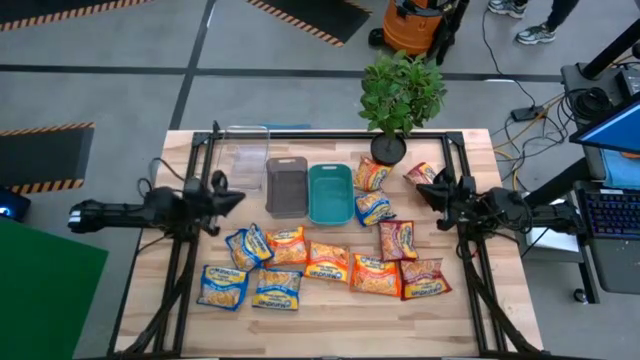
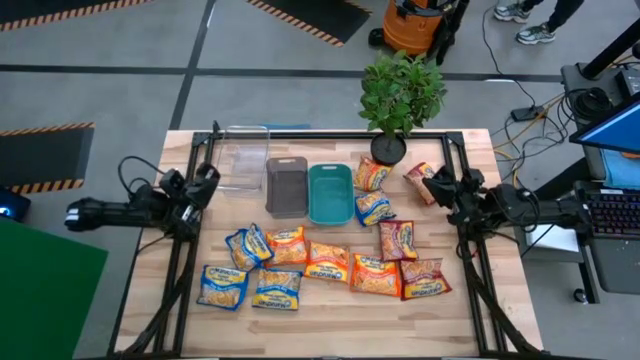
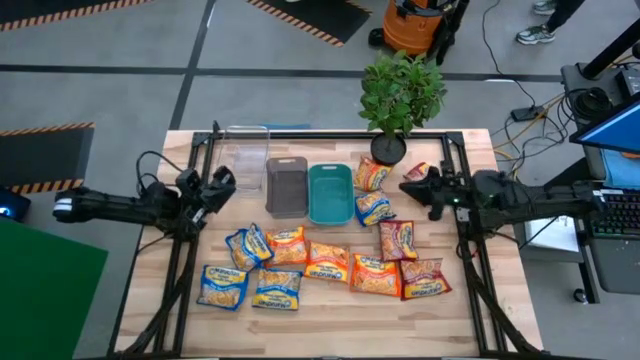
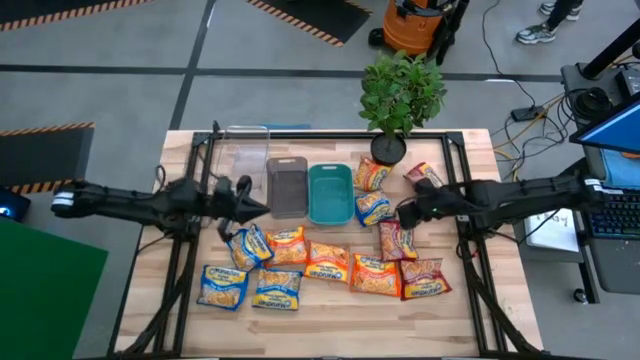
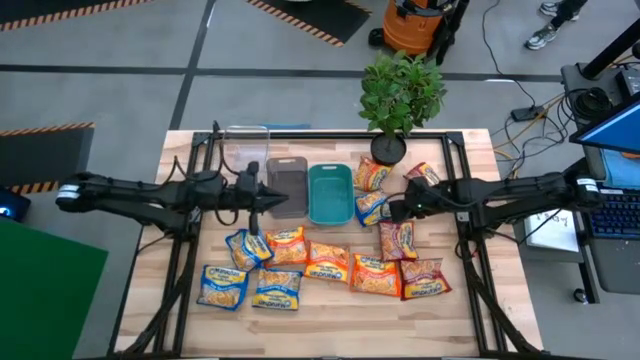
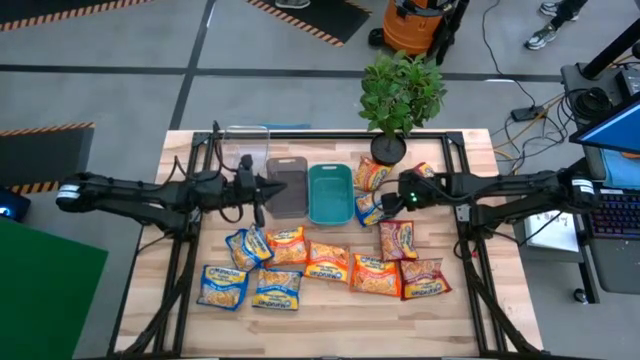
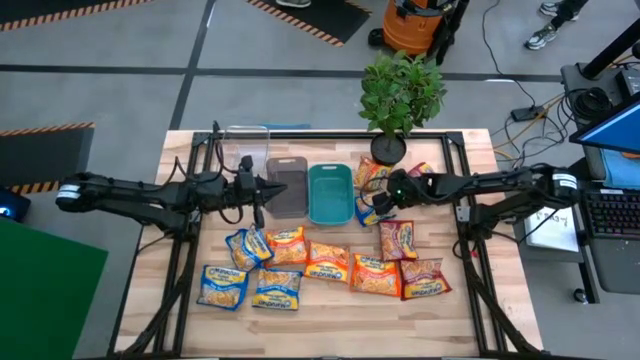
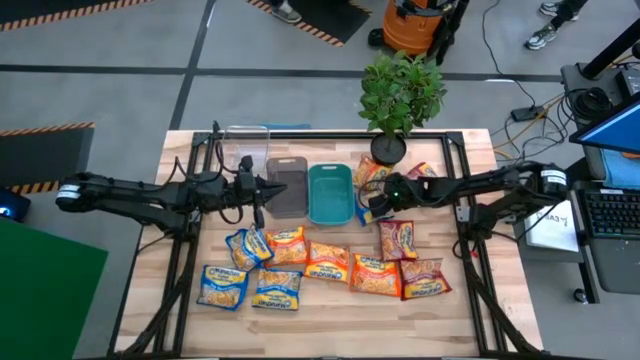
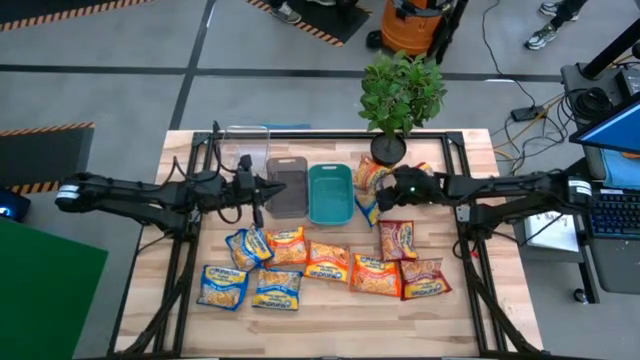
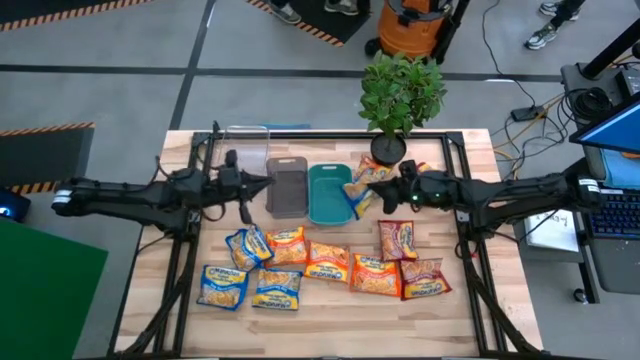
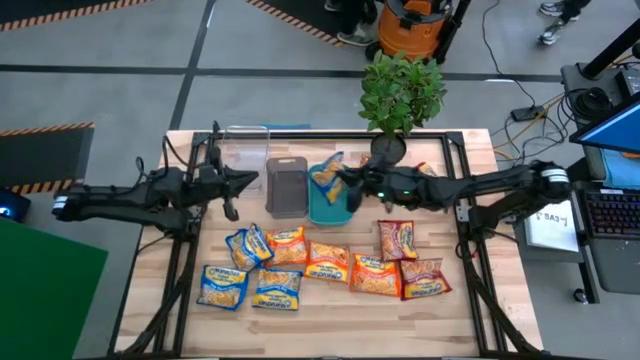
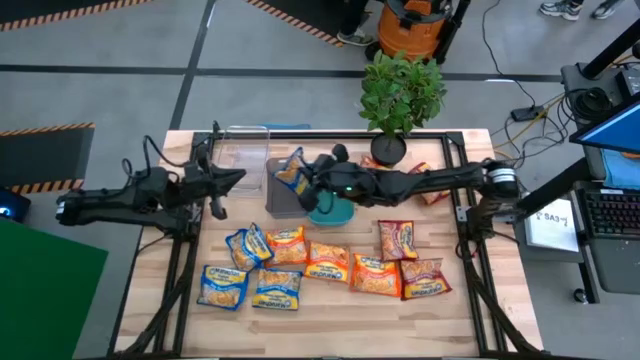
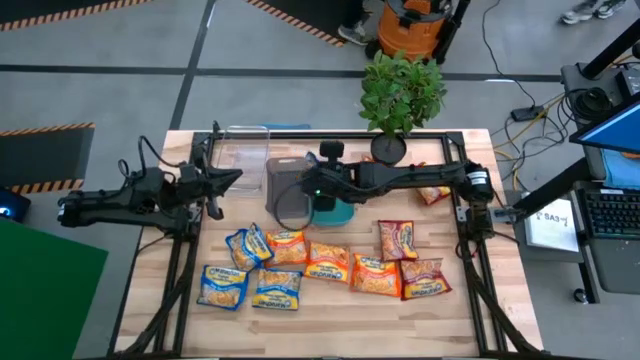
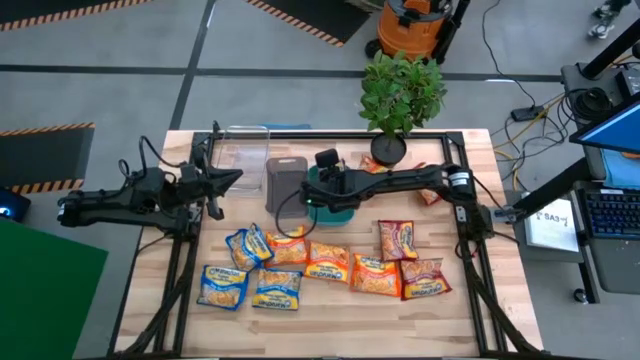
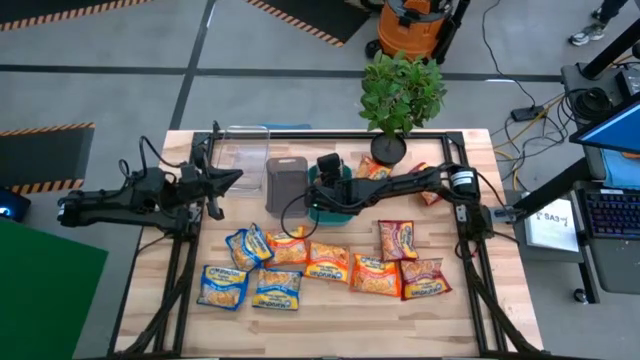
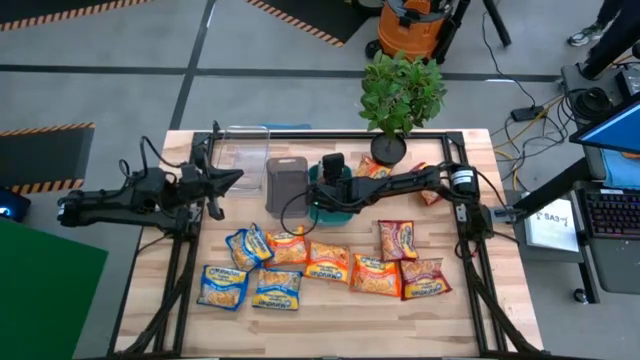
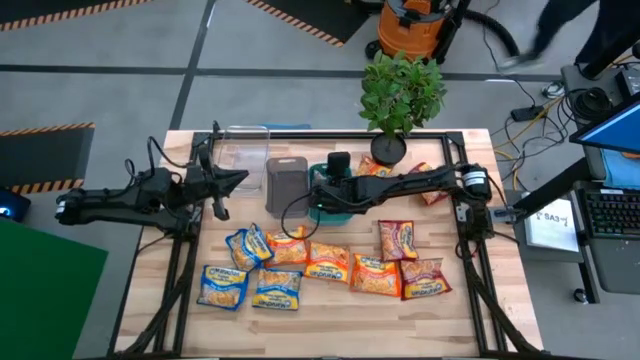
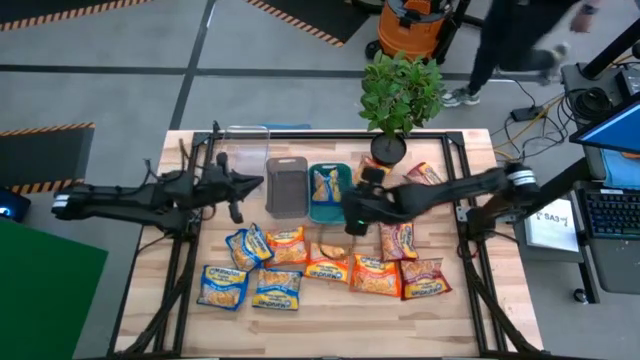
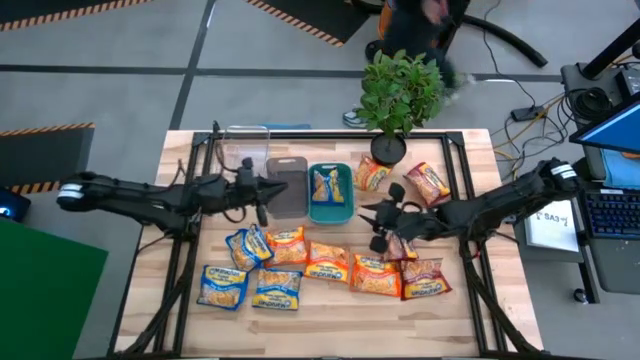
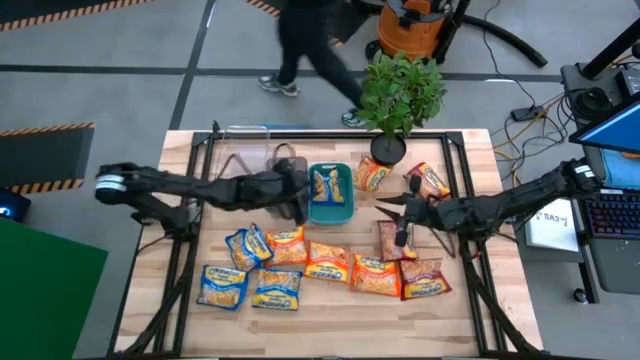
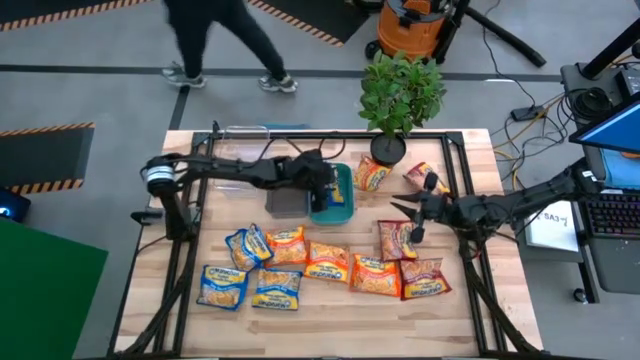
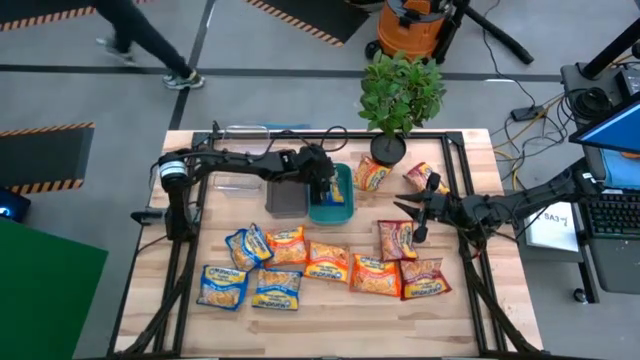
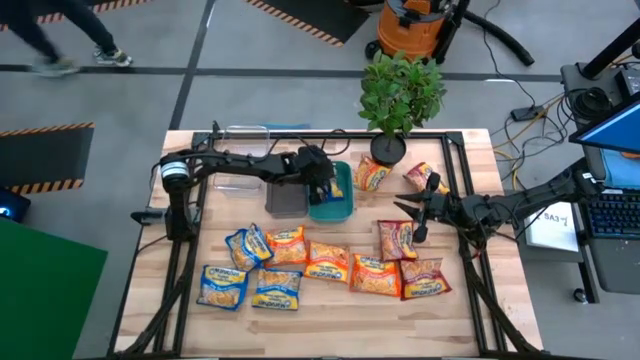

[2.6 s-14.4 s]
Task: Sort Maruchan noodles
Put the blue noodle pack into the green bin

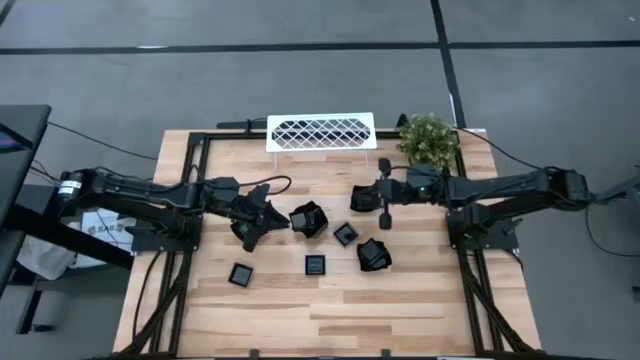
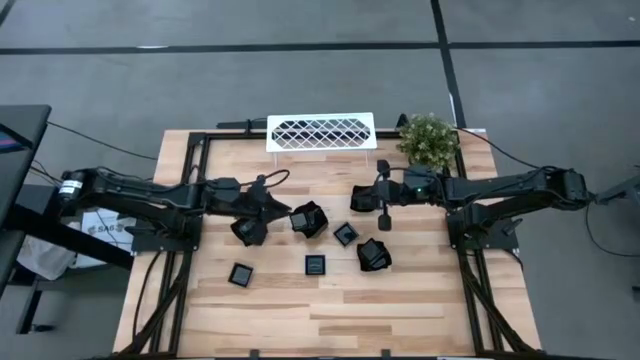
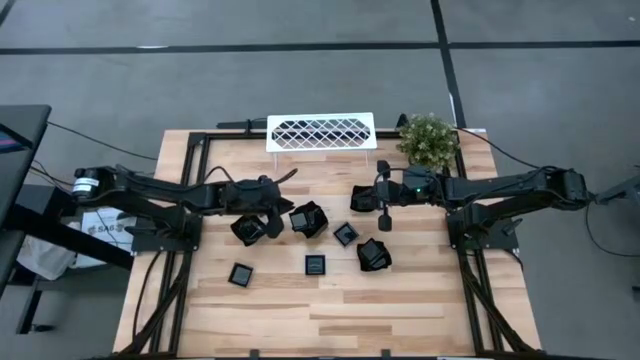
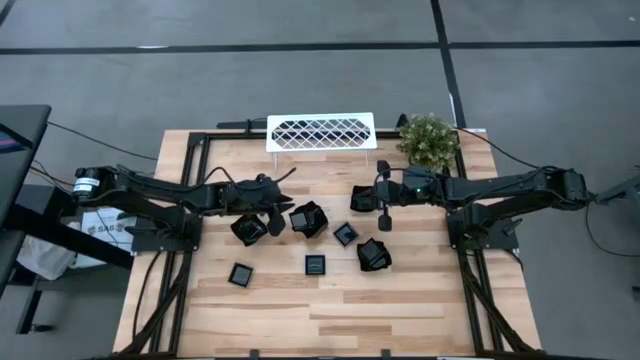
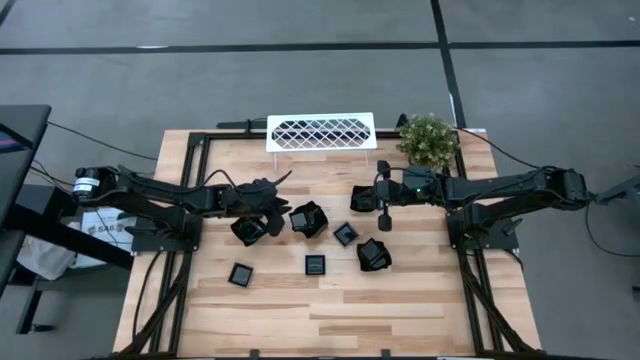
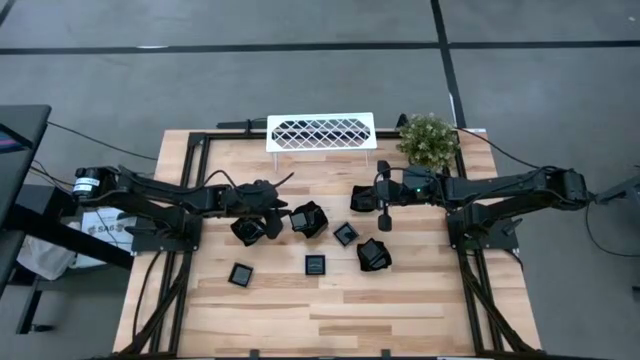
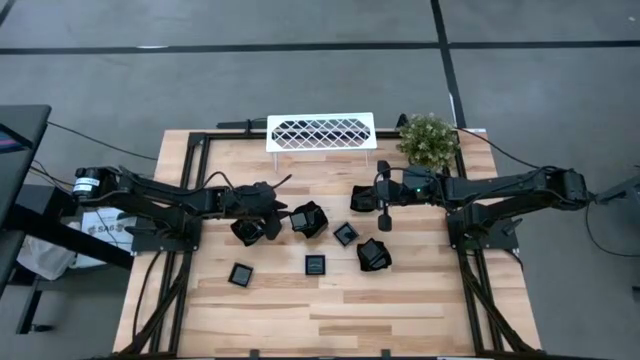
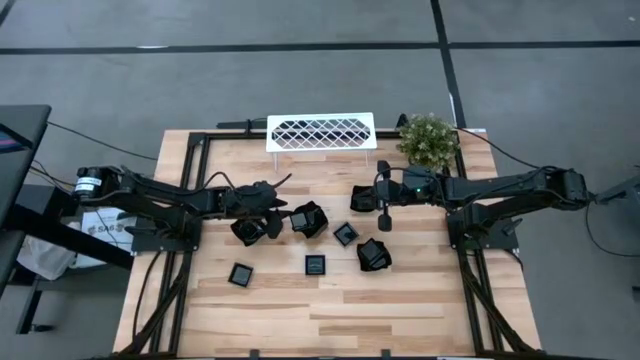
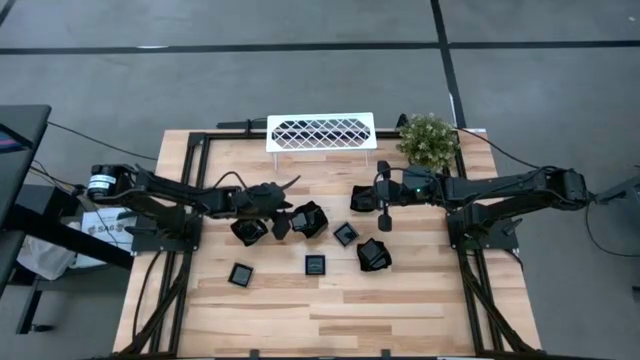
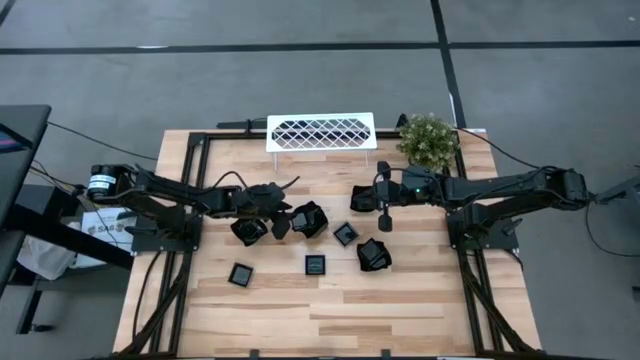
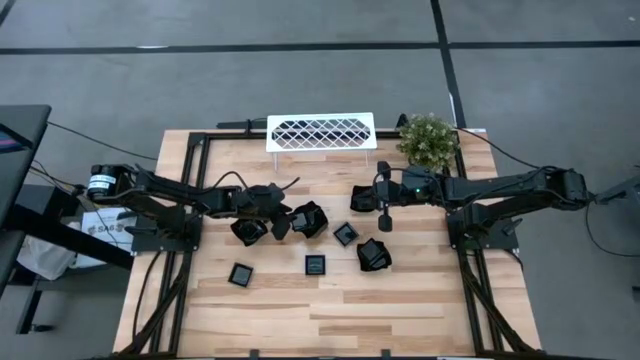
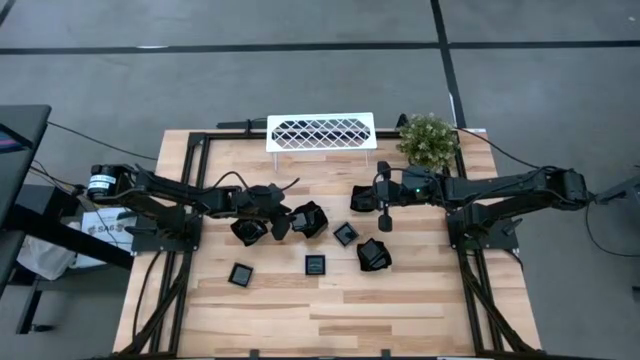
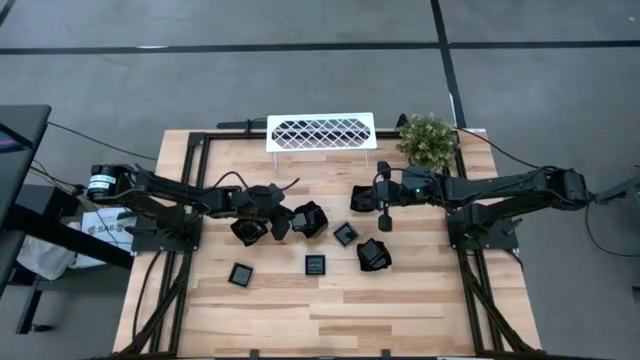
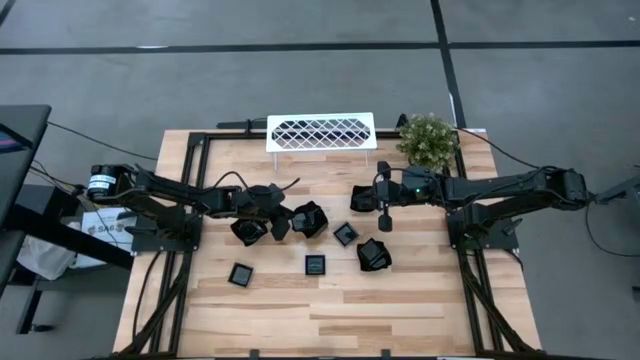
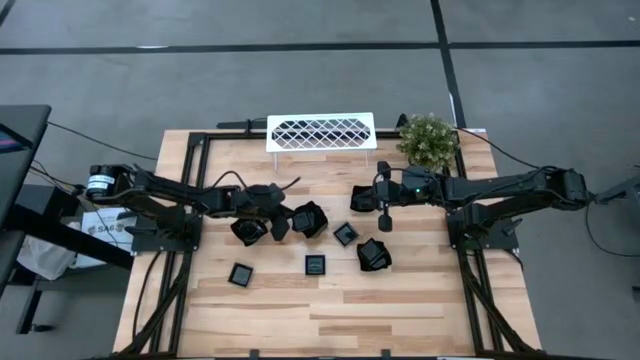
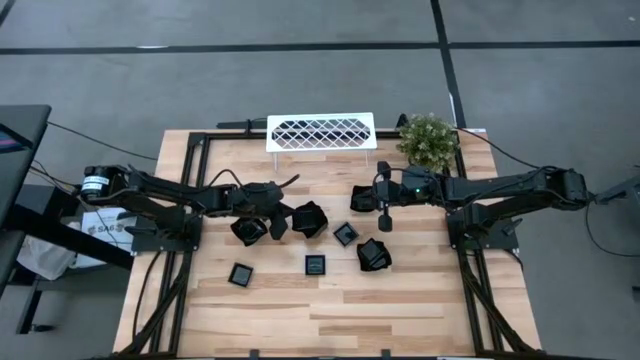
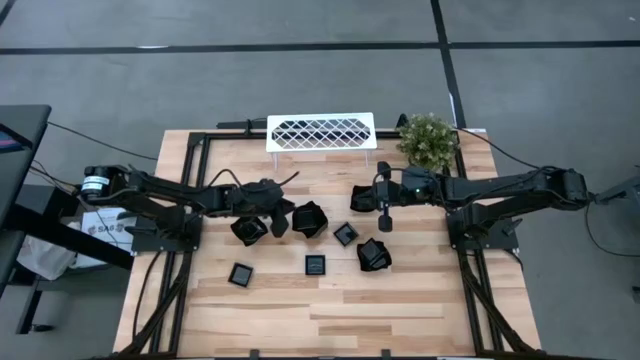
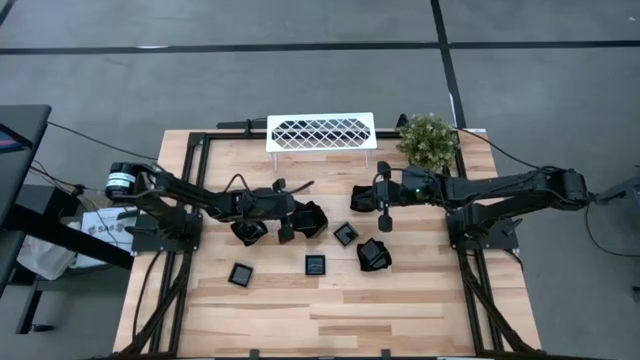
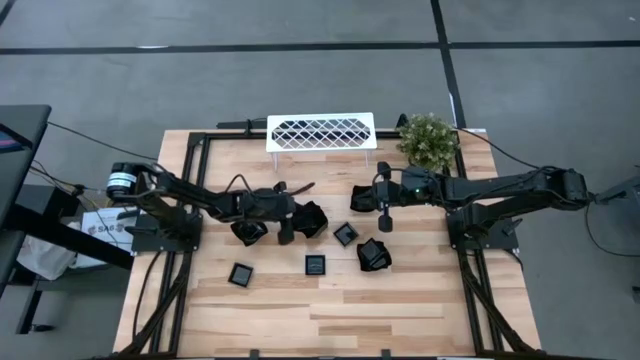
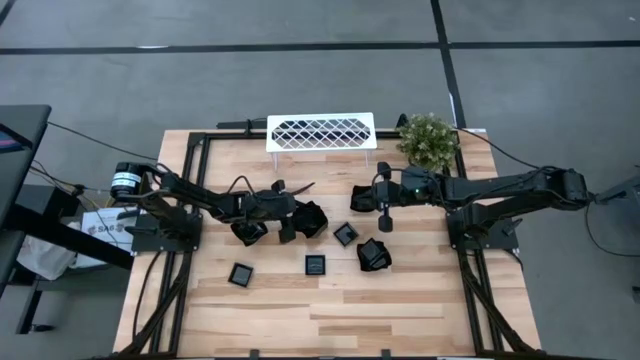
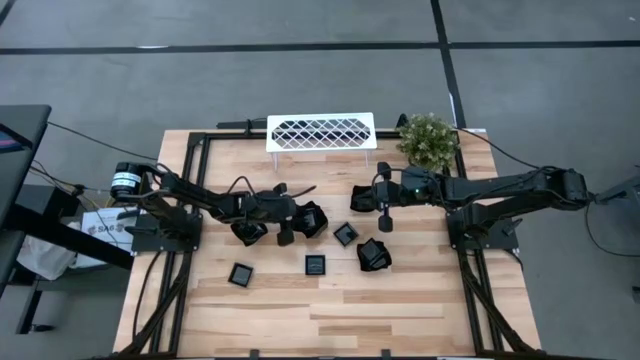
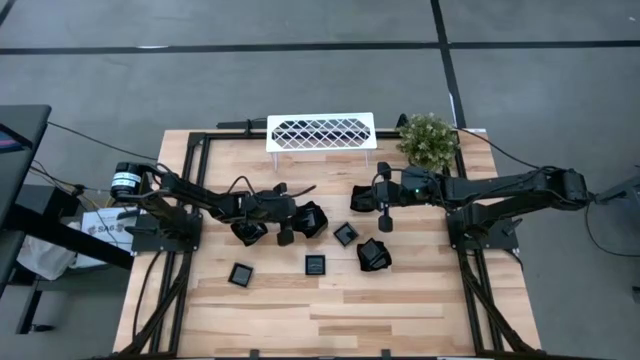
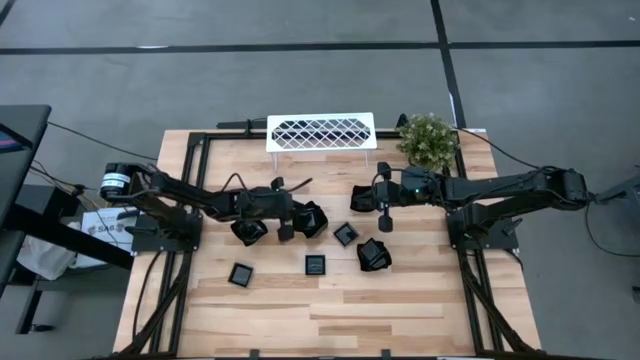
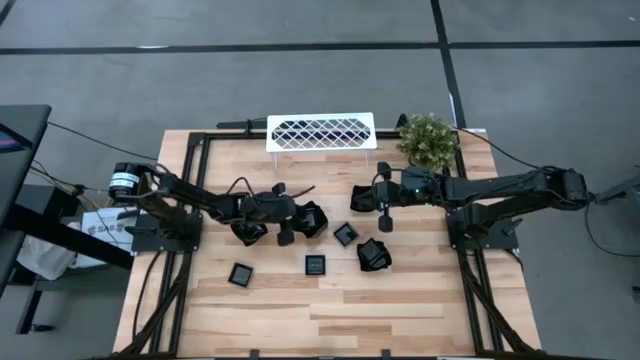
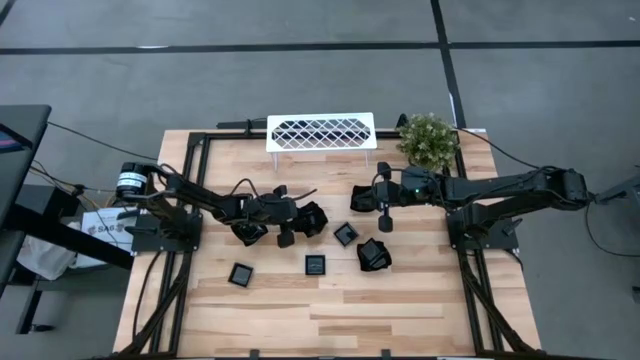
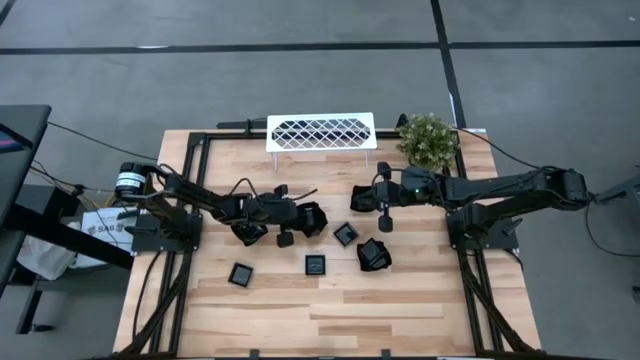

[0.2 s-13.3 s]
Task: Pick & Place Mini shaped plates
Put the black square plate on the shelf
